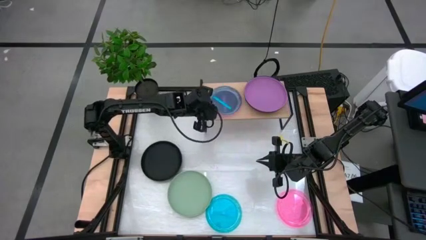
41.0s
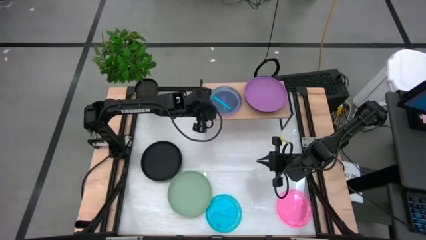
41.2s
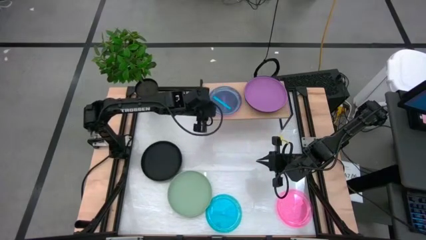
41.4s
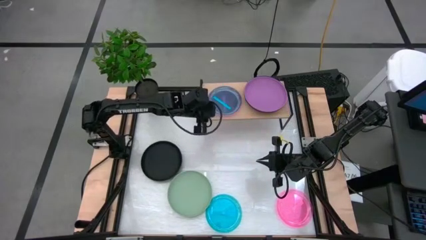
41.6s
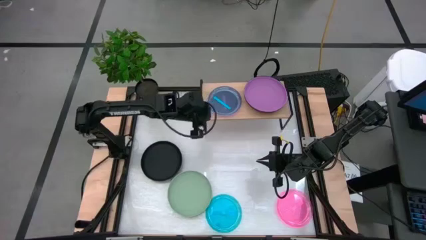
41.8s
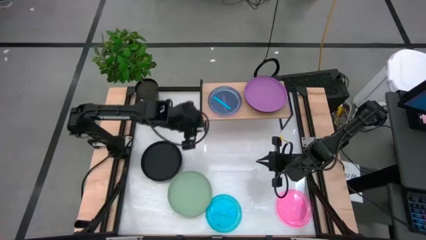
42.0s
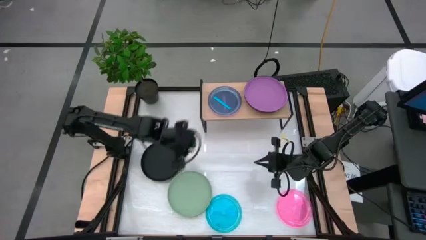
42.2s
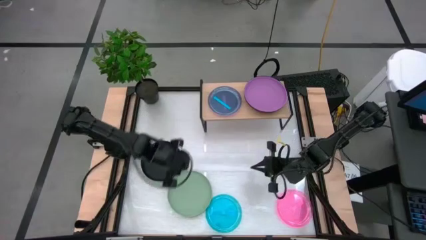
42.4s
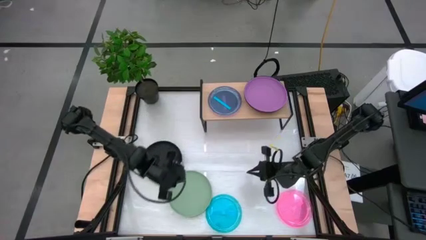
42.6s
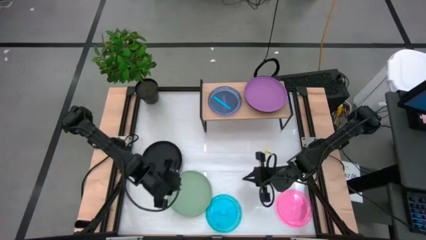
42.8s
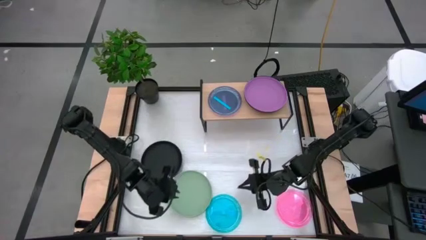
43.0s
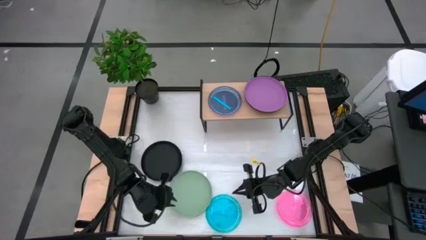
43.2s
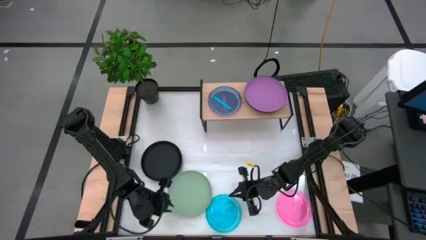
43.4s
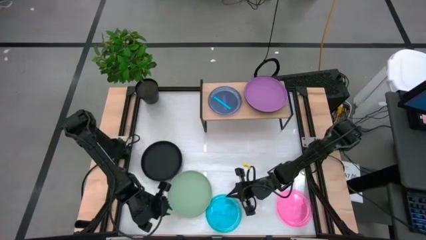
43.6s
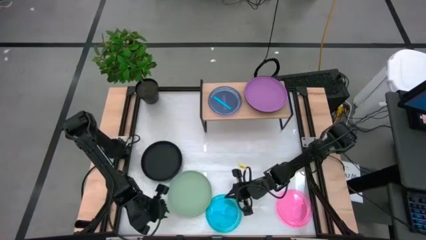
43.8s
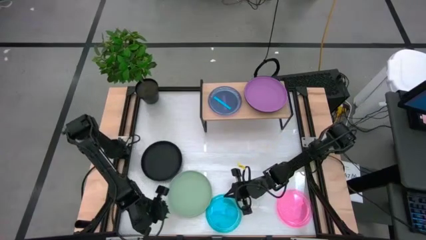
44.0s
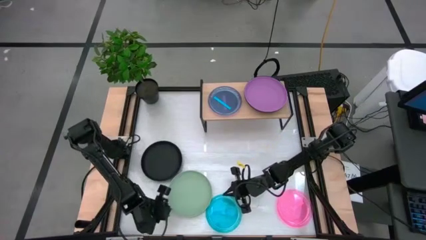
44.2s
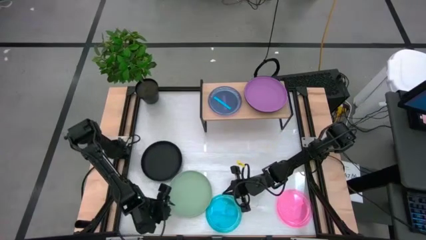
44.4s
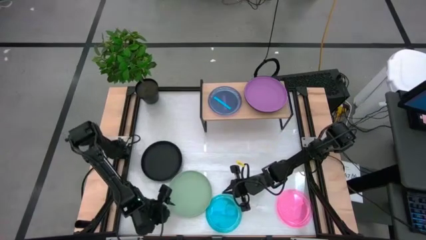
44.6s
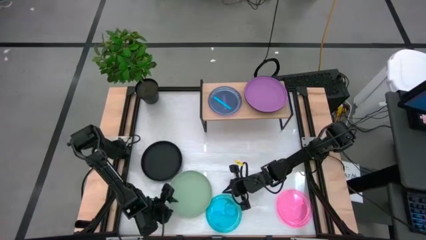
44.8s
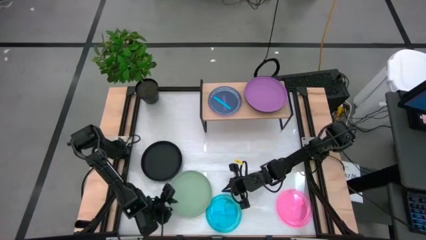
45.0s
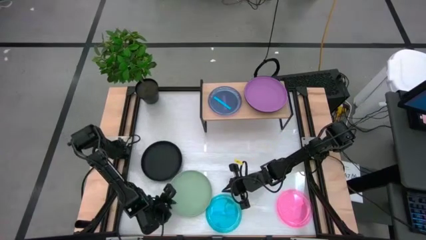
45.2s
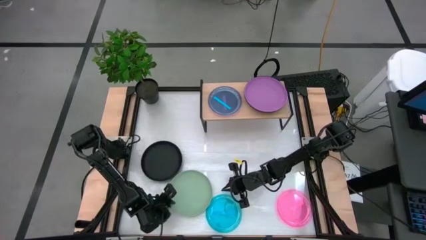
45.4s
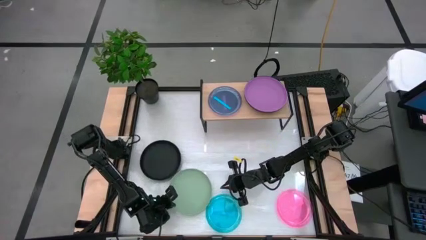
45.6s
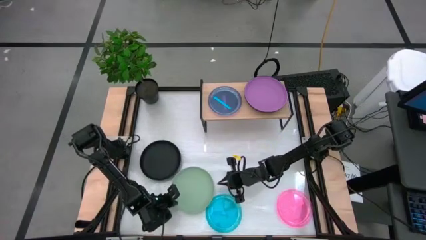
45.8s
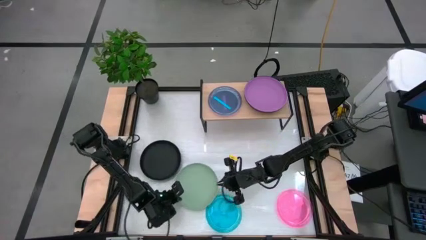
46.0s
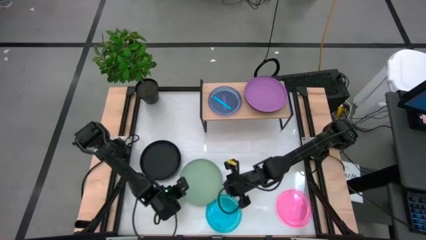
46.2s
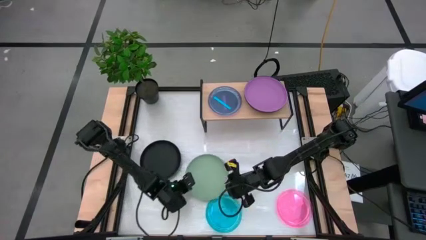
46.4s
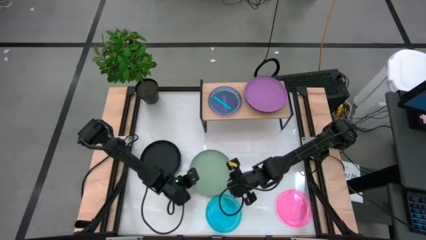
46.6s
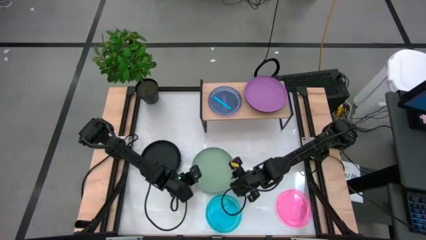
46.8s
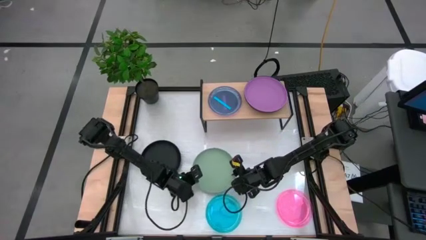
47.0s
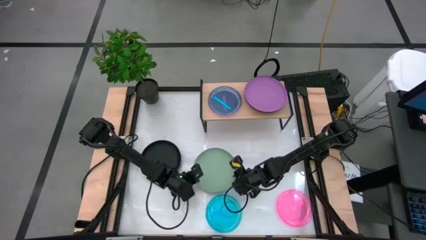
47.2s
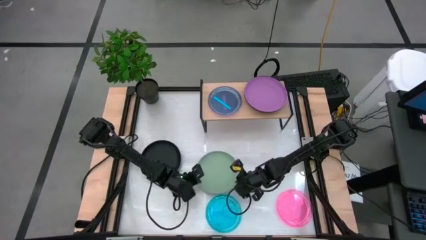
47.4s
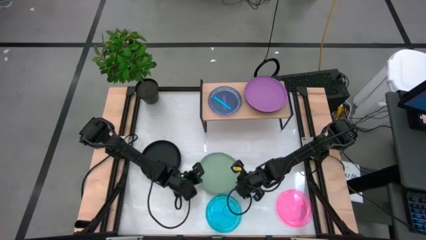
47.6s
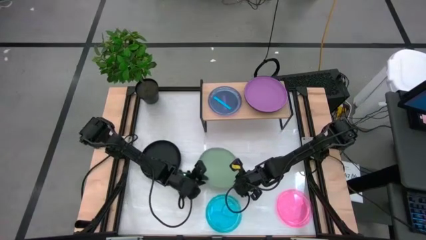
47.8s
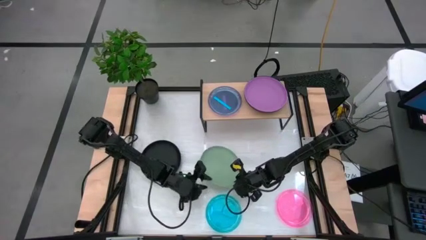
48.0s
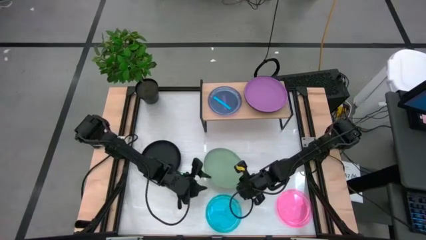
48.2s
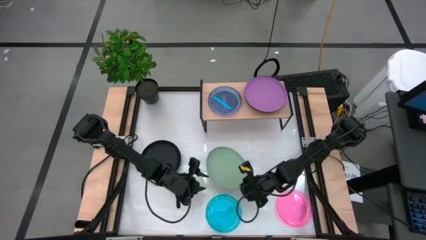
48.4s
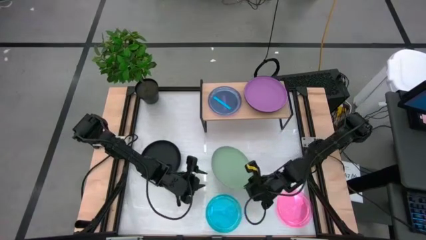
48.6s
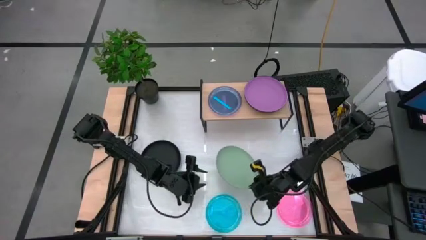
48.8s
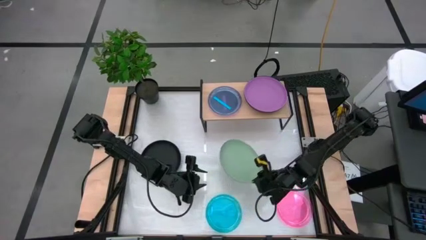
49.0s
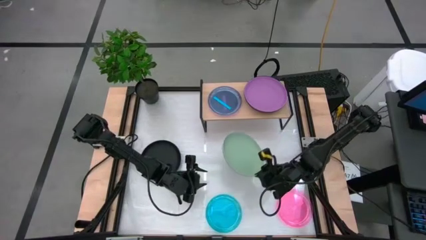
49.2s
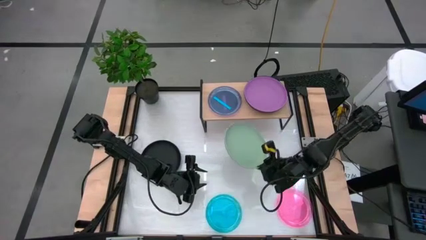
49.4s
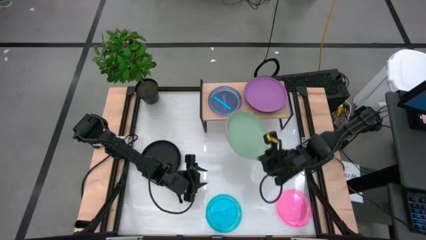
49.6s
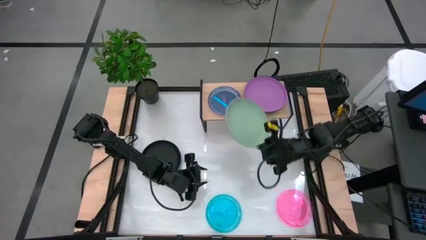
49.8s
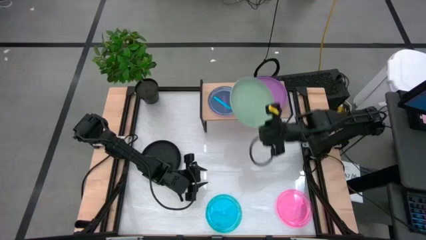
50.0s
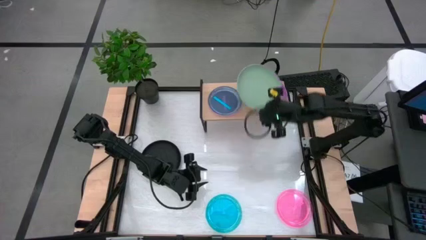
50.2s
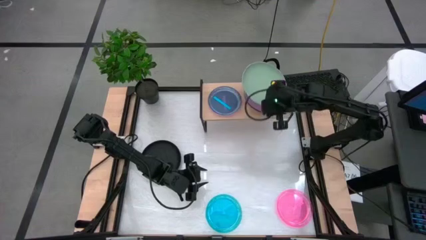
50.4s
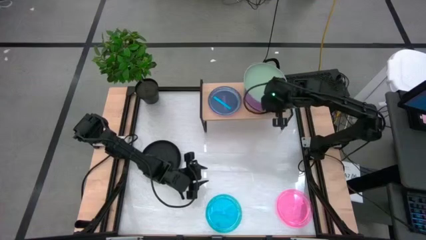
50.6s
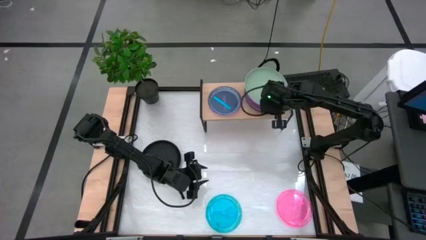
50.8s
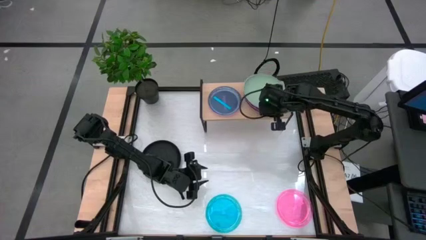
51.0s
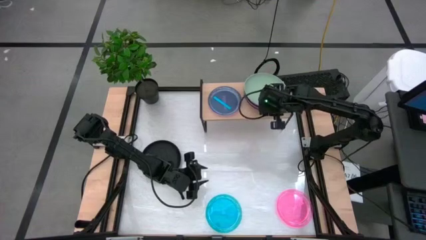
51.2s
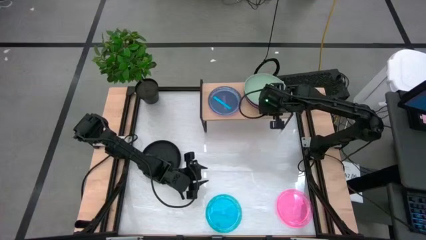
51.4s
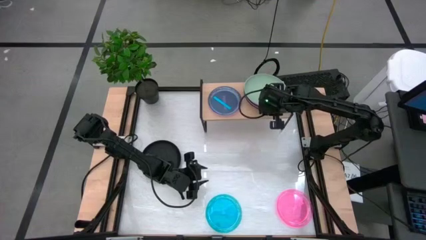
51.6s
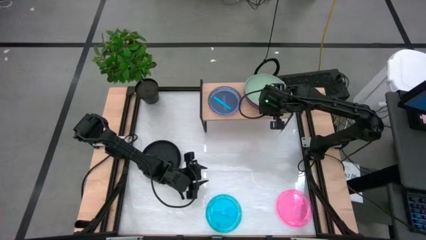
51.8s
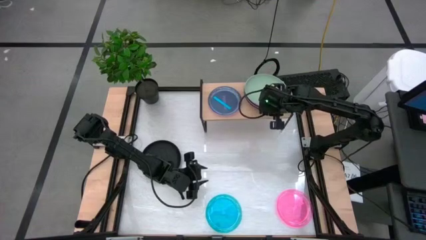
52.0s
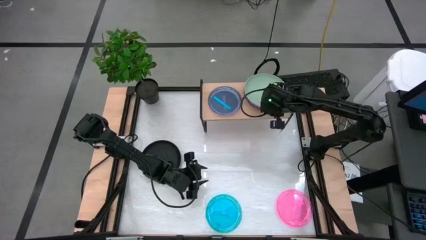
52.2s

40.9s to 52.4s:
Task: Place and stack plates onto a shelf
Stack the light green plate on top of the violet plate on the shelf

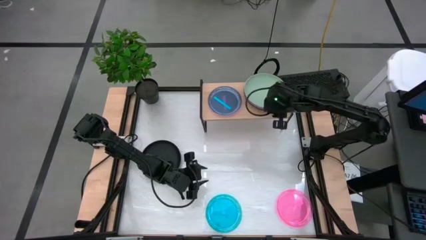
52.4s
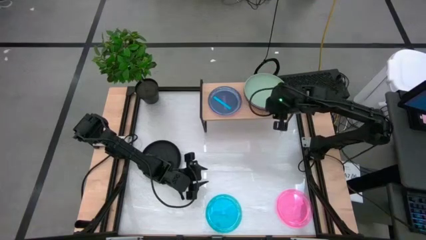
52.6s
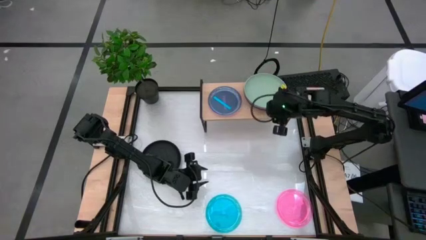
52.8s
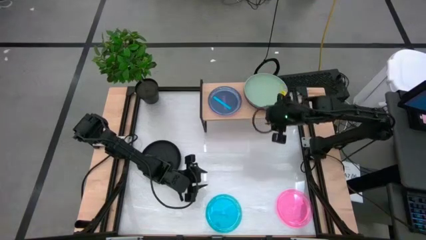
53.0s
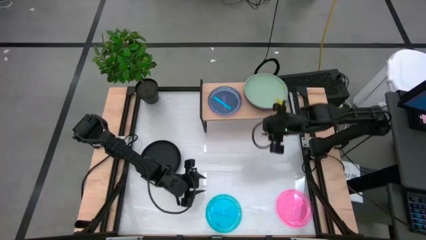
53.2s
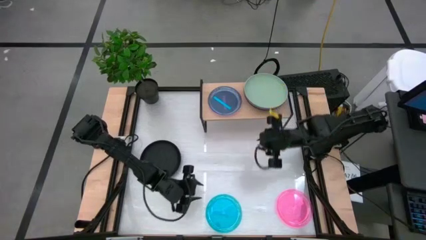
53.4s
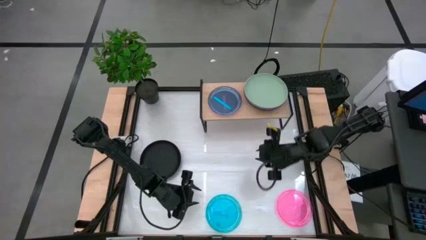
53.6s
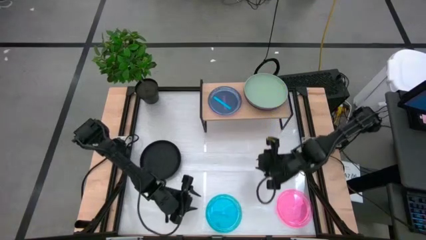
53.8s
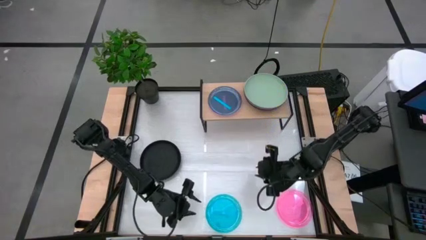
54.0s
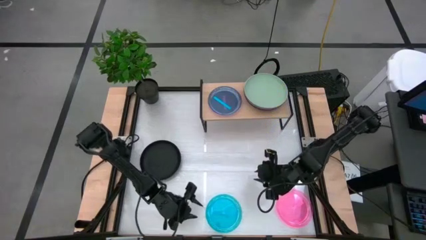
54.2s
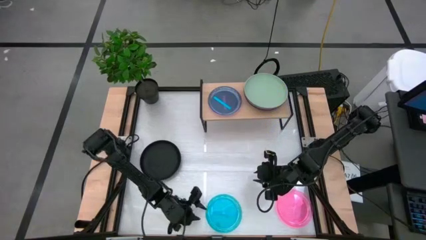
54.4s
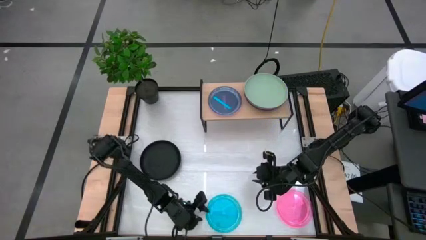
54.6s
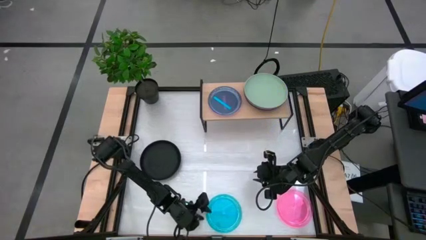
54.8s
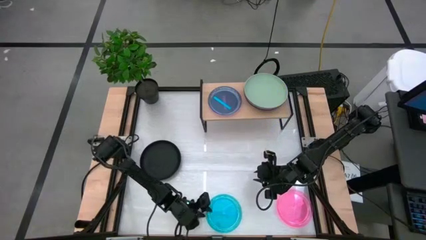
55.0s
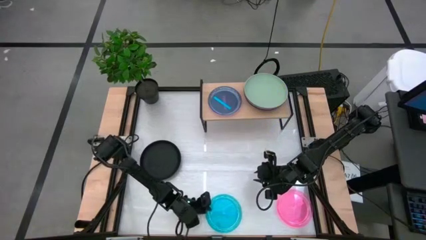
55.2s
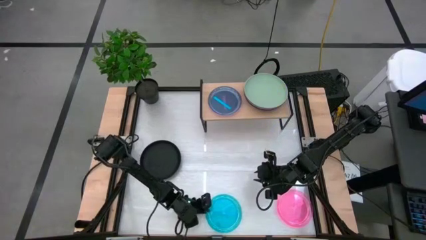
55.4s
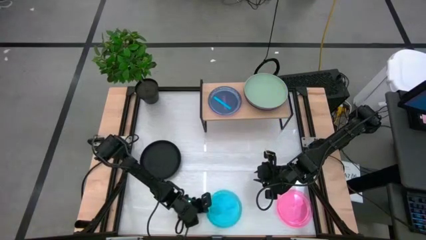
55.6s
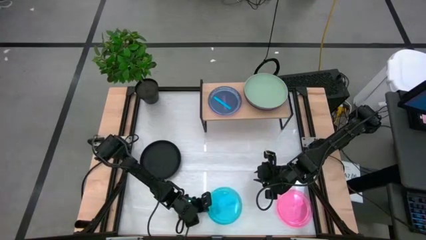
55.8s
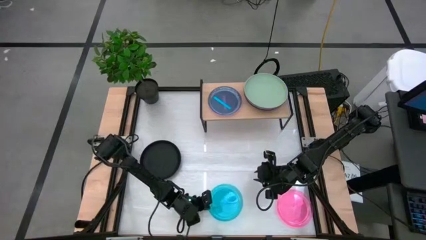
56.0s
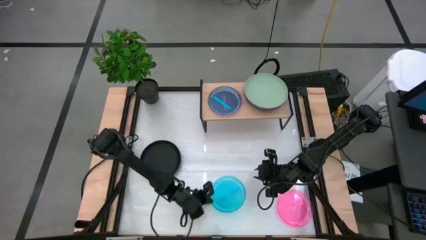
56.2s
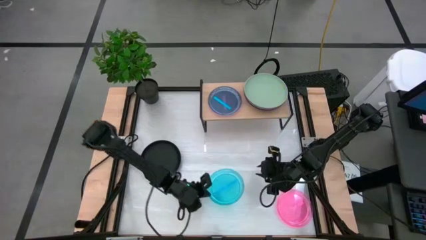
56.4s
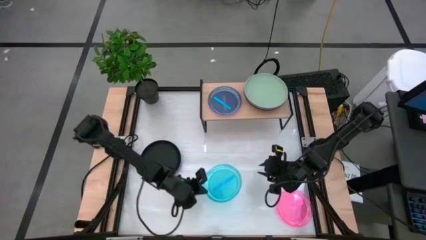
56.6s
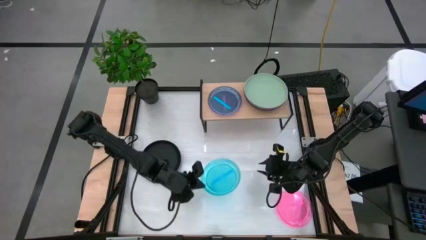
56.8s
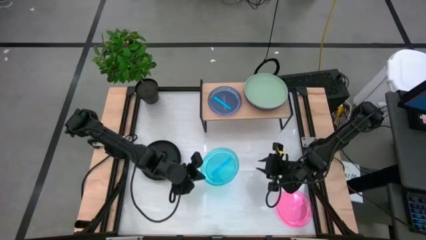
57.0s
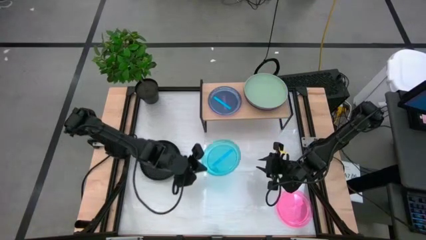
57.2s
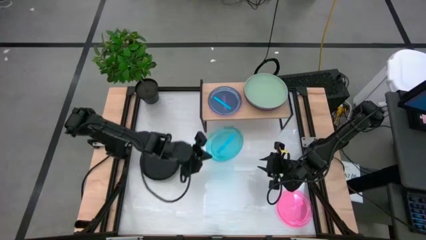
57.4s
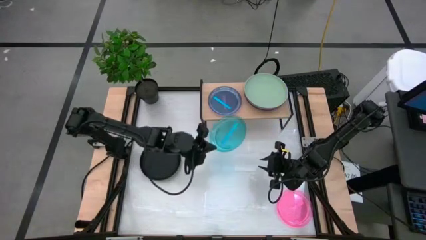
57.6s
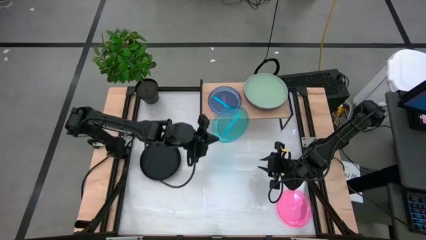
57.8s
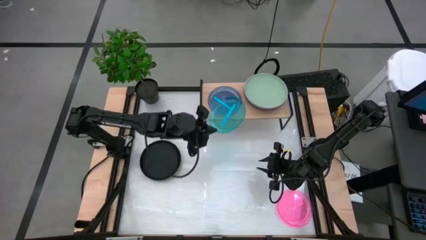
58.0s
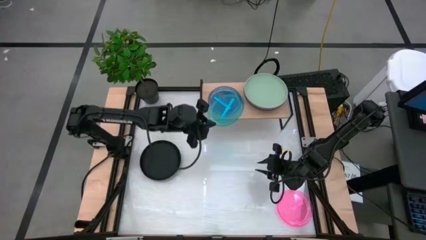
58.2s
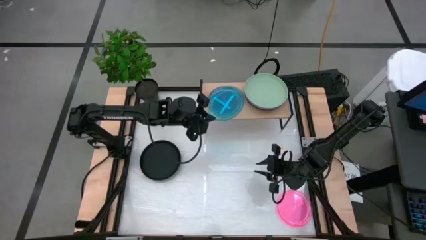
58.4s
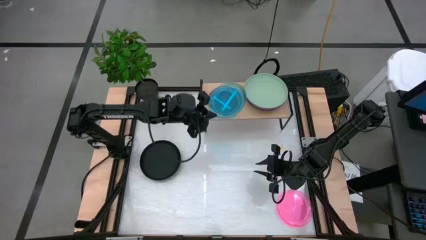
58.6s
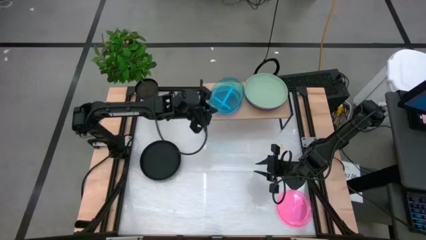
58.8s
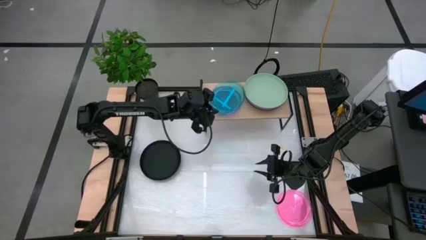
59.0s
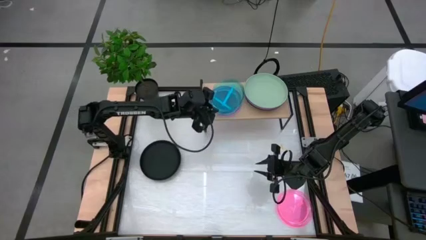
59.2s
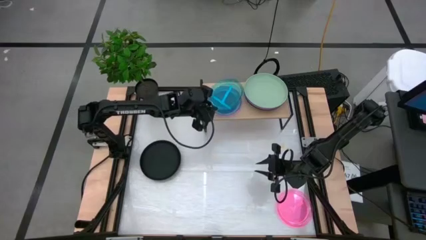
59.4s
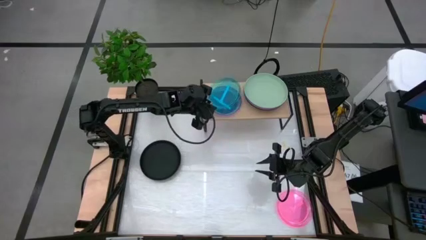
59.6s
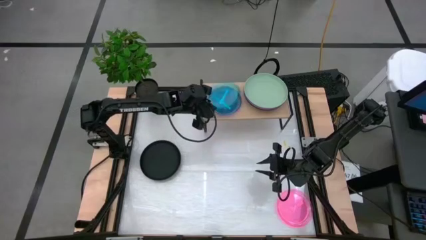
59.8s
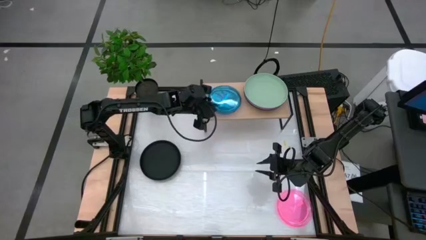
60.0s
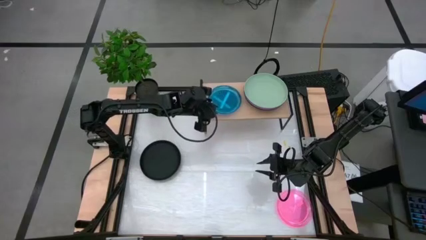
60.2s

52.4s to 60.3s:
Stack the blue plate on top of the blue plate on the shelf
